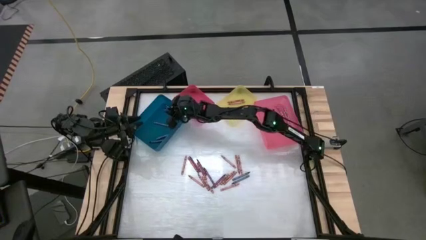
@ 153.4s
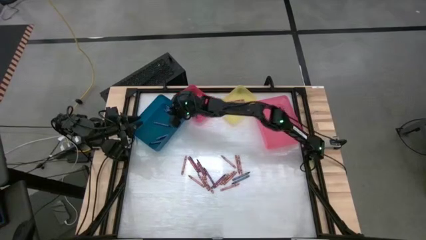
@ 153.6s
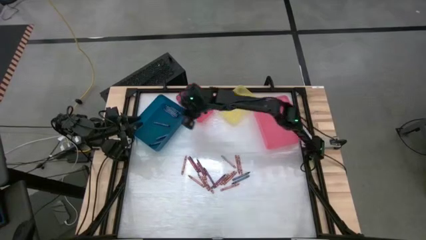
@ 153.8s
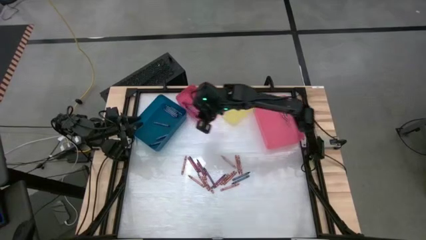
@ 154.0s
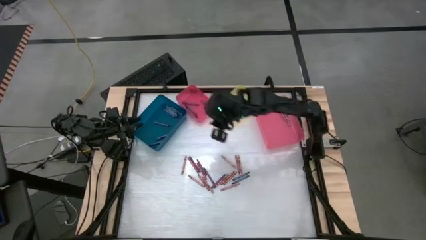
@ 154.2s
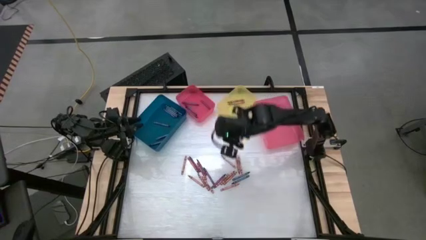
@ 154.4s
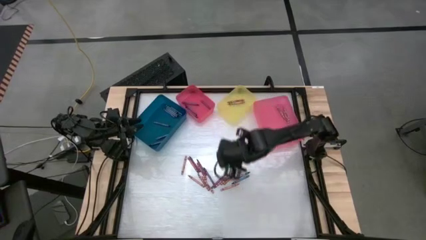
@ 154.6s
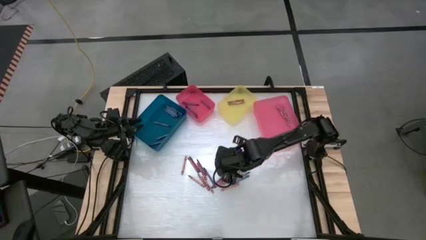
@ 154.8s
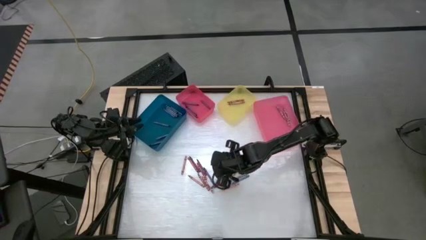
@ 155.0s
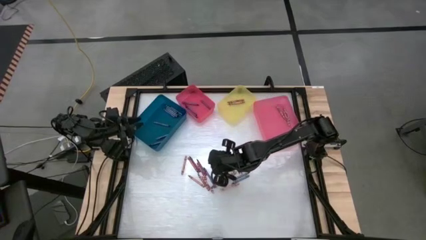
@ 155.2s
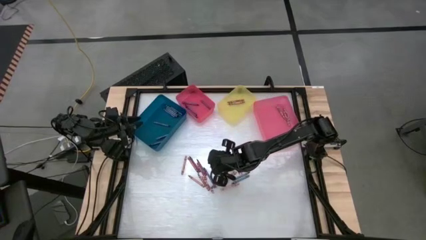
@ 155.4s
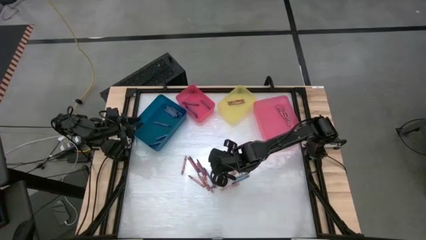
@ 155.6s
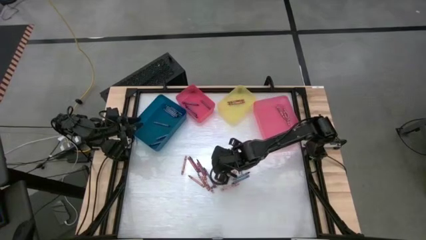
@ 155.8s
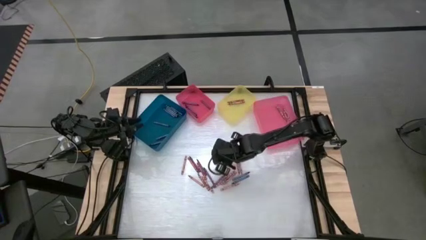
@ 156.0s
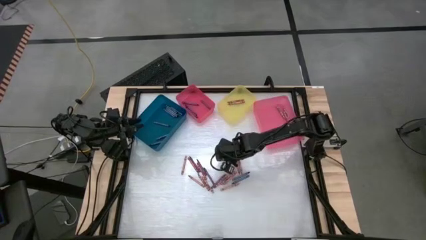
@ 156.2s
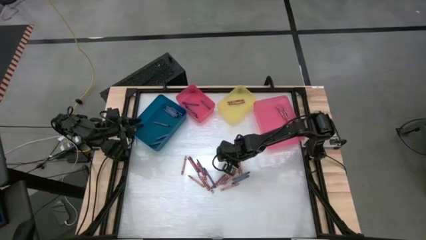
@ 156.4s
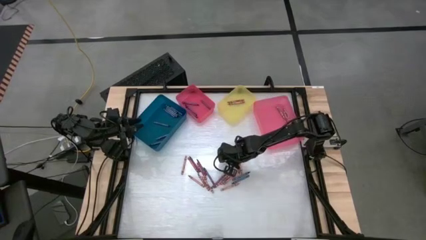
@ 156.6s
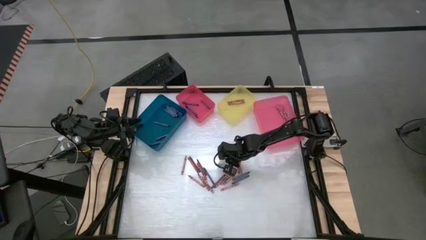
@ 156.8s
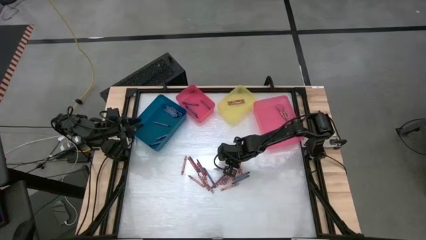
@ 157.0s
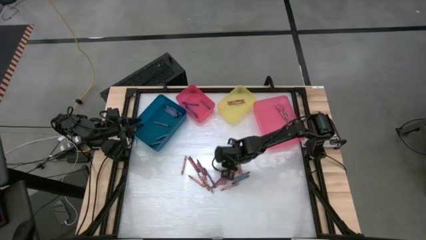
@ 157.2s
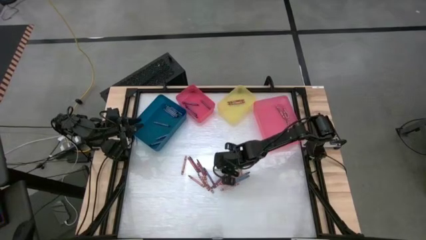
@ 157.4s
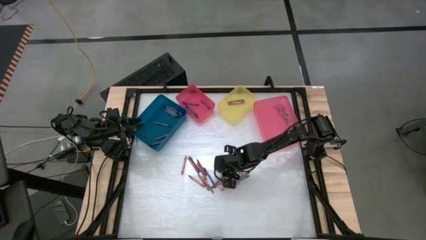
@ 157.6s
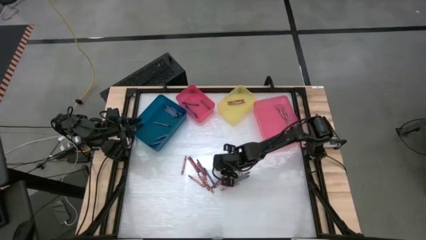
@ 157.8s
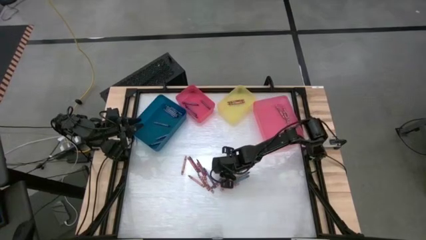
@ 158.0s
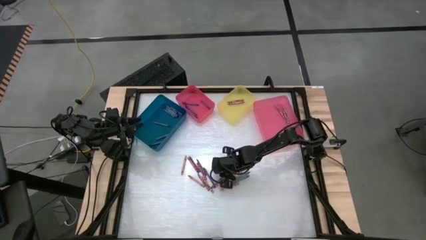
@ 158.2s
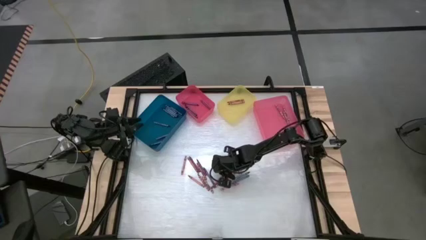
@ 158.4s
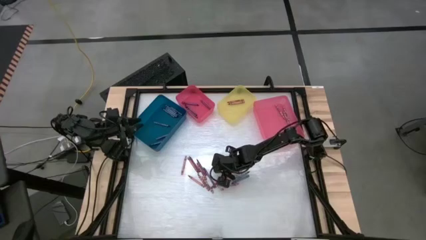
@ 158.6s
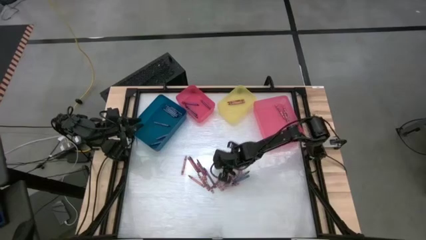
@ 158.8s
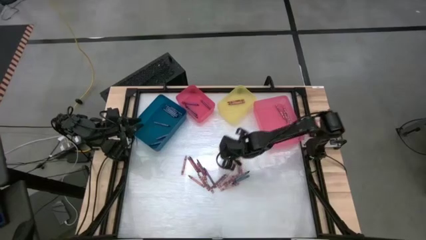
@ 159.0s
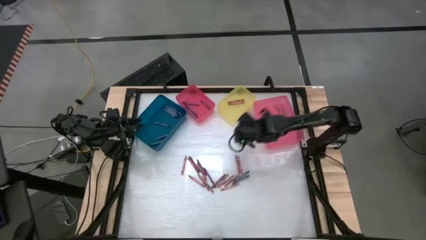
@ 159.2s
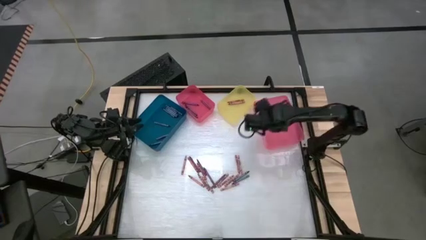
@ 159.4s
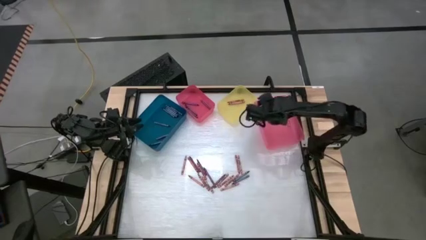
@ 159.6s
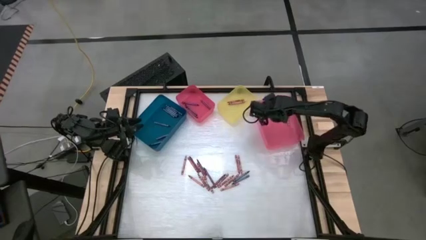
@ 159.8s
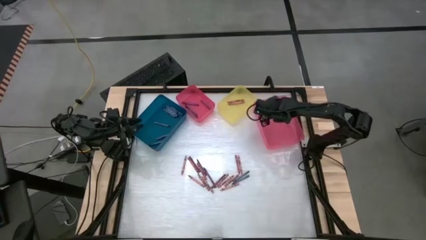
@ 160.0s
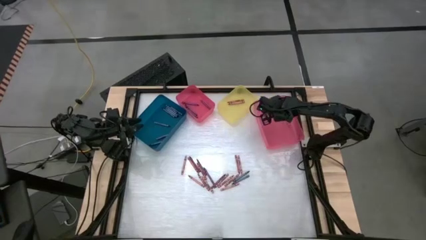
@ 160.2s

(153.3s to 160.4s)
Task: Sort crayons
Put the pink crayon into the right pink bin

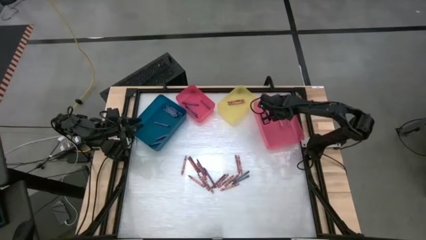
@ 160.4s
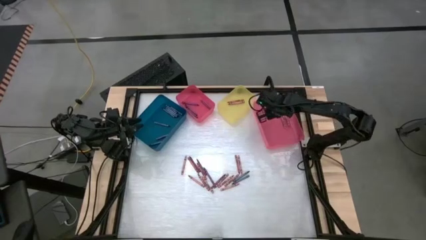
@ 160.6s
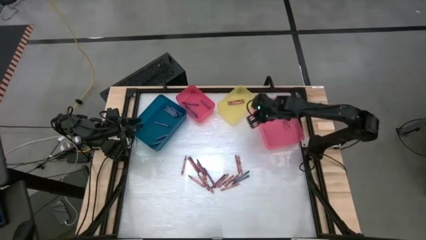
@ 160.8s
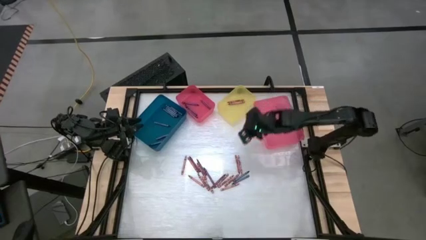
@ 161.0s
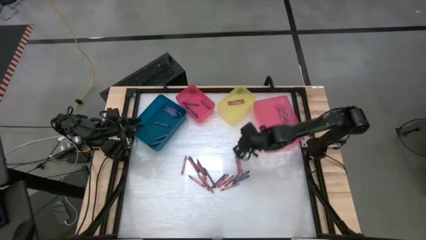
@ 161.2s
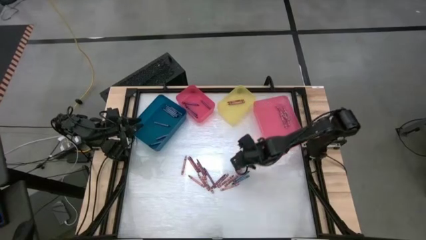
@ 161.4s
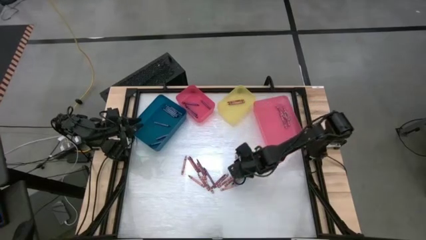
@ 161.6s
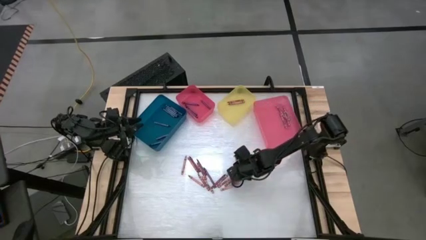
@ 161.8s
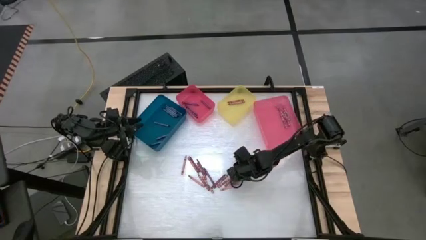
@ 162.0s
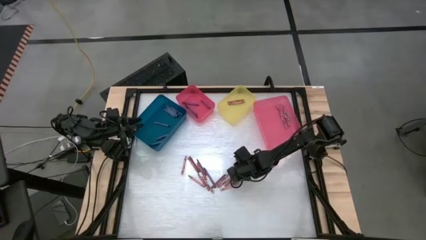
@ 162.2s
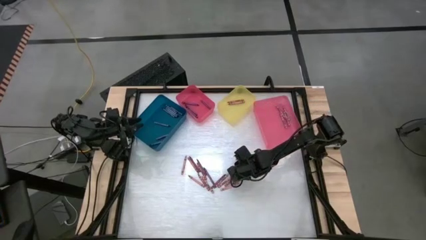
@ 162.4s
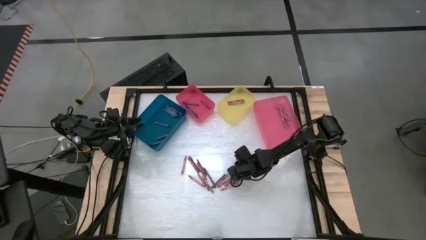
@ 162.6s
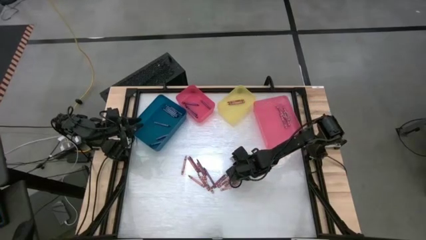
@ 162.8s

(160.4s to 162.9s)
Put the pink crayon into the right pink bin

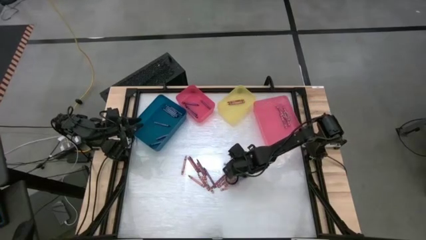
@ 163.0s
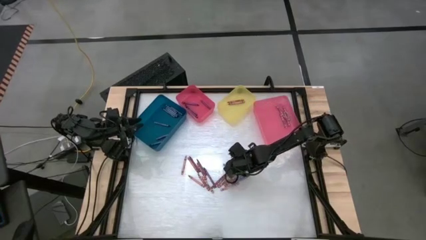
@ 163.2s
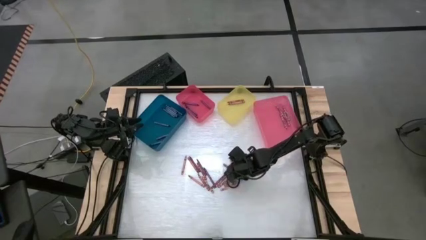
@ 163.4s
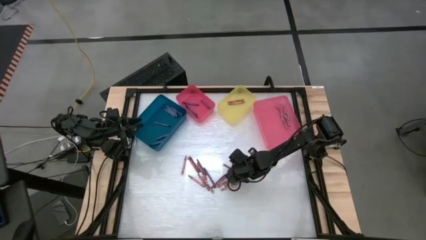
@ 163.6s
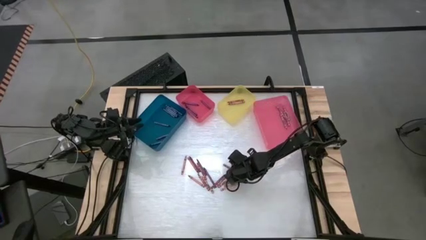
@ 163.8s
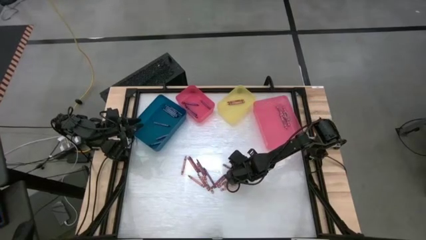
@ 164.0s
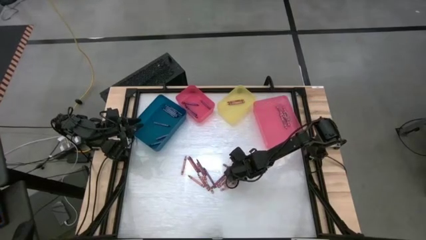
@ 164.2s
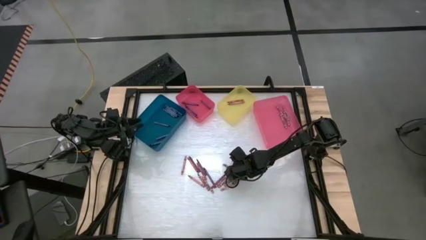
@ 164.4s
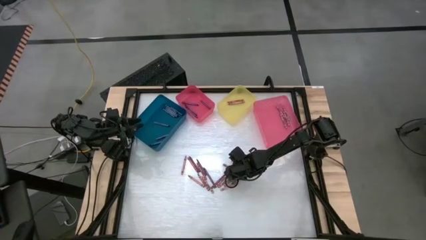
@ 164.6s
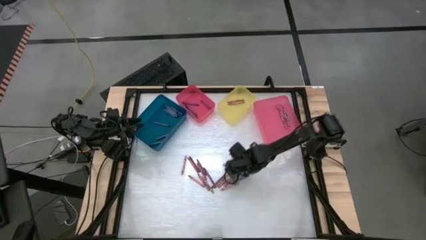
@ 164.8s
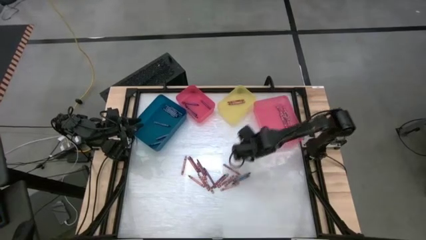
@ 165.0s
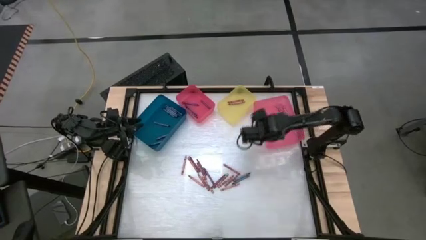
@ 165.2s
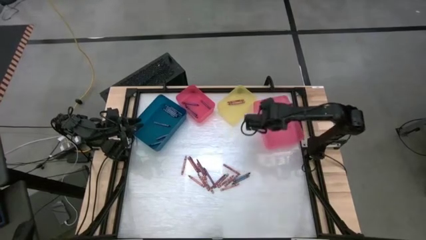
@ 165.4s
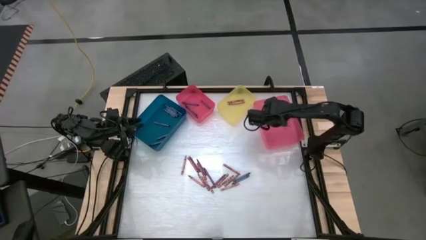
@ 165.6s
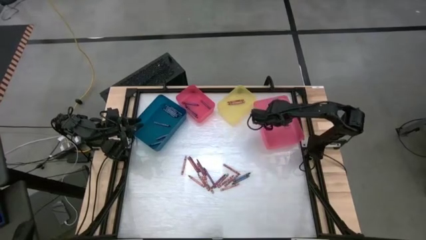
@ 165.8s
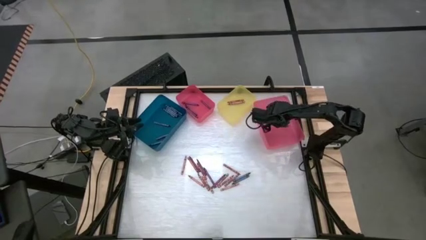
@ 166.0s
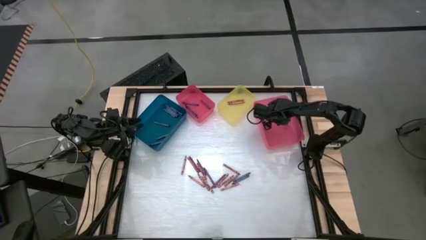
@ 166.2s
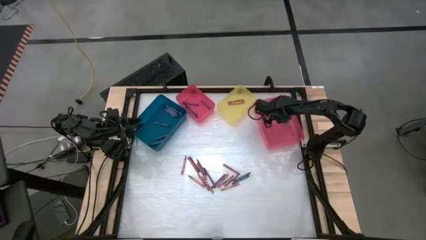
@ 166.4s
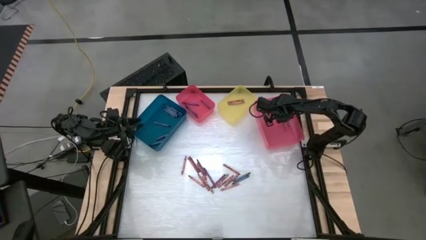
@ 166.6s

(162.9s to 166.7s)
Put the pink crayon into the right pink bin

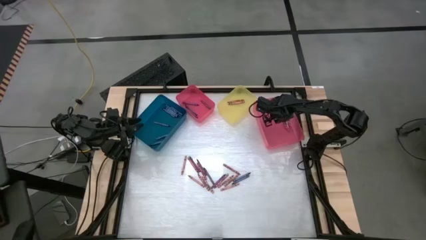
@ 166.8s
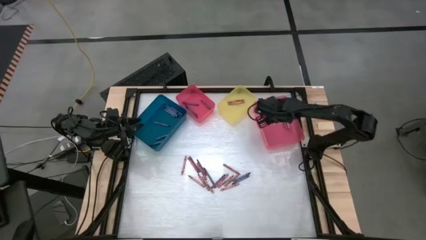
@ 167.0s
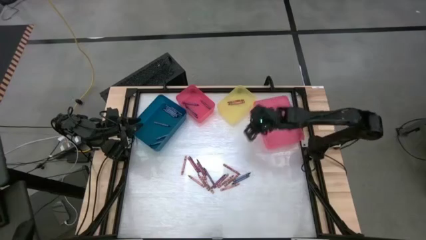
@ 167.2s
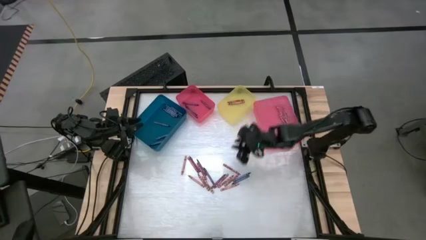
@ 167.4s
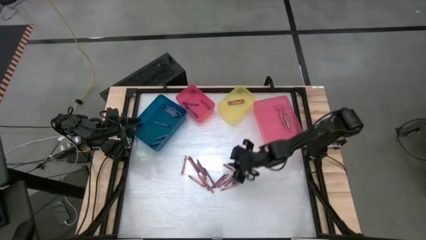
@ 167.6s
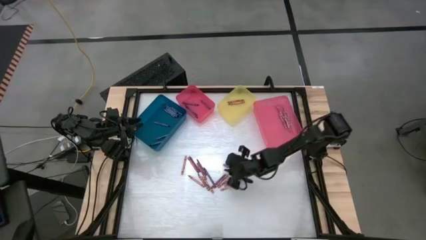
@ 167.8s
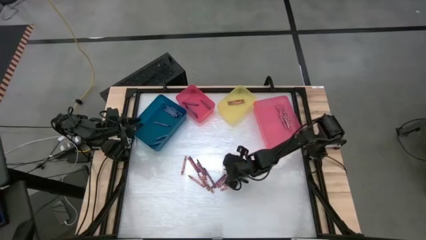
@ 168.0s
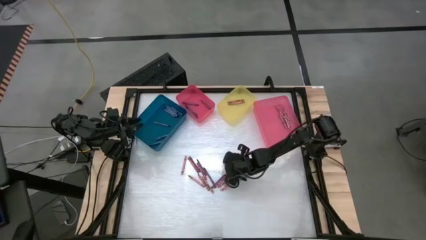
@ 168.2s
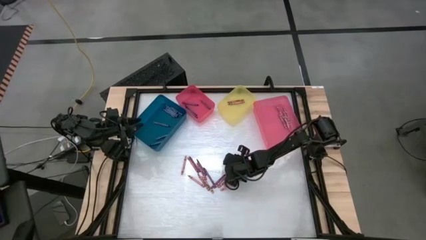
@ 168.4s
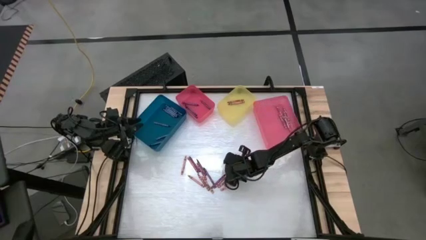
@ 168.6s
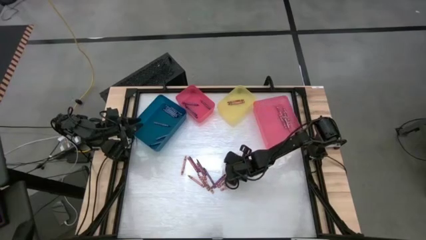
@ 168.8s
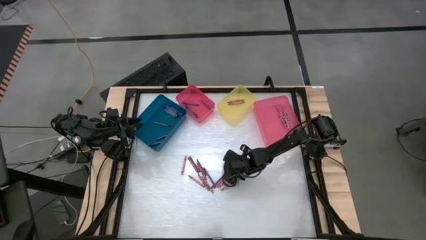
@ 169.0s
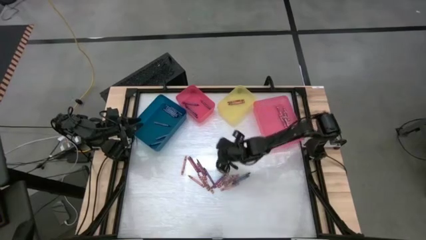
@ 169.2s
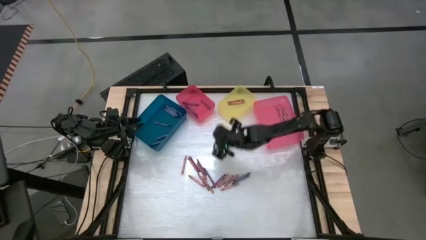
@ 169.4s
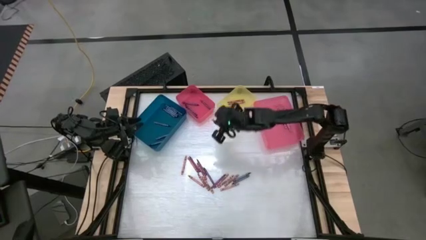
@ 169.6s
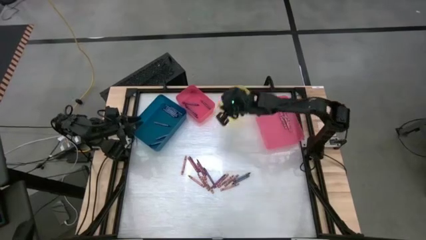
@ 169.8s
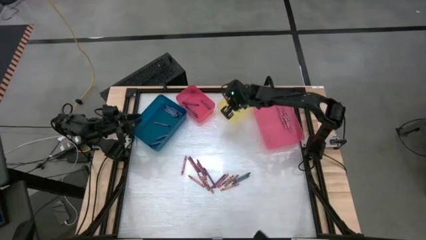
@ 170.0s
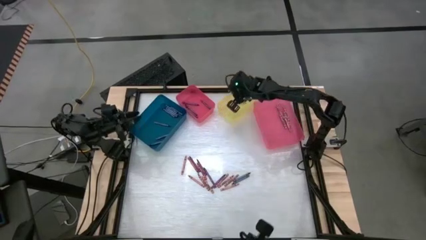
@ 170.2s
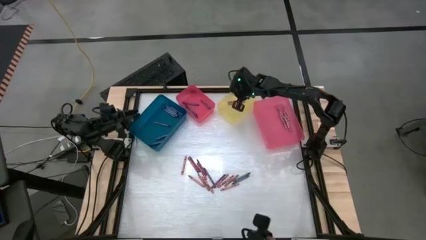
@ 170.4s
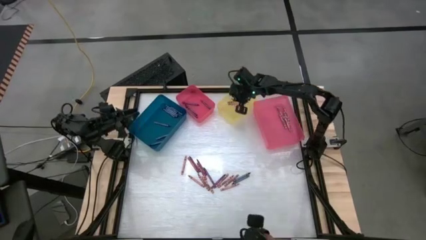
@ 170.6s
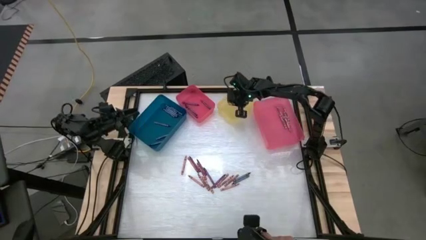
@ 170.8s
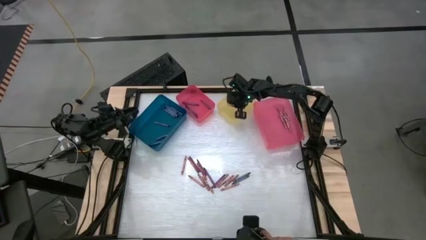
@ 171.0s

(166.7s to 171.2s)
Put the red crayon into the yellow bin
